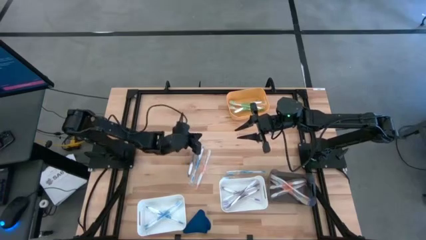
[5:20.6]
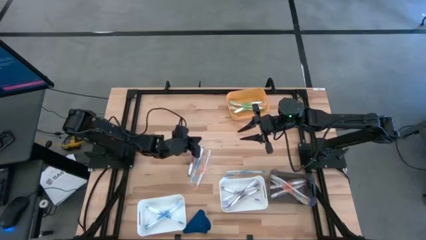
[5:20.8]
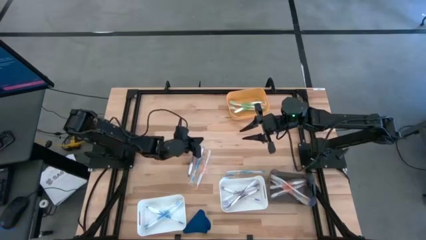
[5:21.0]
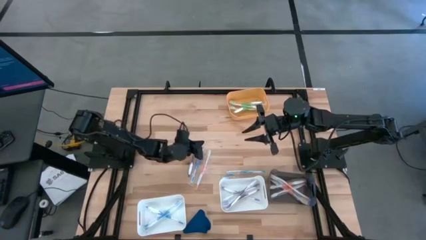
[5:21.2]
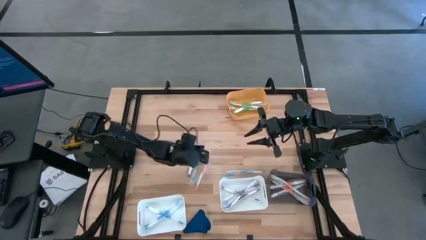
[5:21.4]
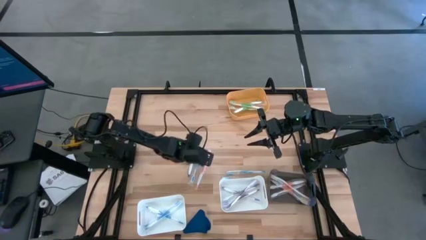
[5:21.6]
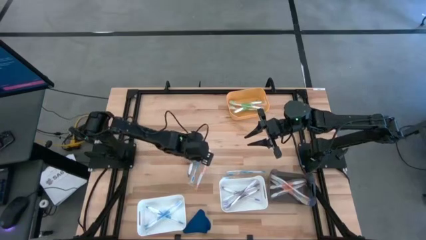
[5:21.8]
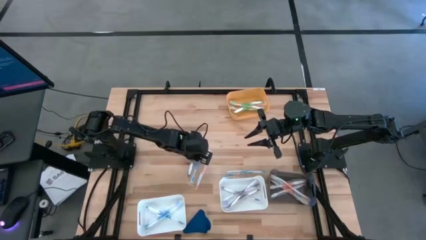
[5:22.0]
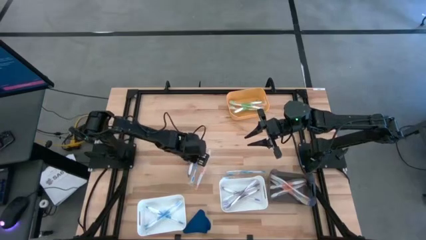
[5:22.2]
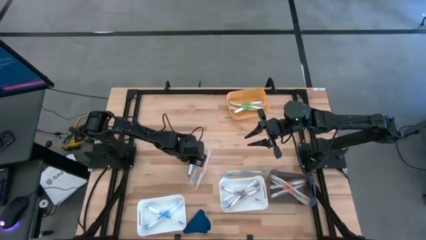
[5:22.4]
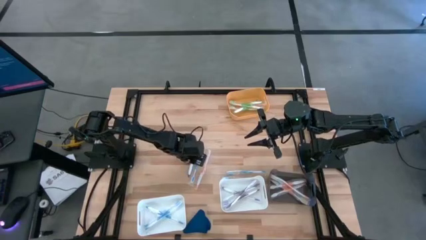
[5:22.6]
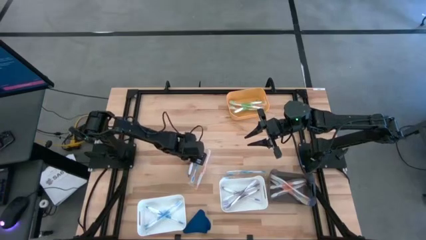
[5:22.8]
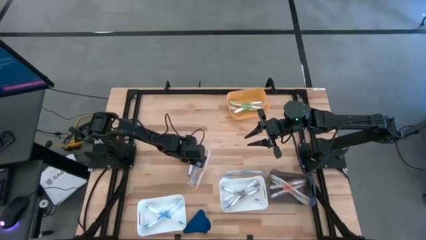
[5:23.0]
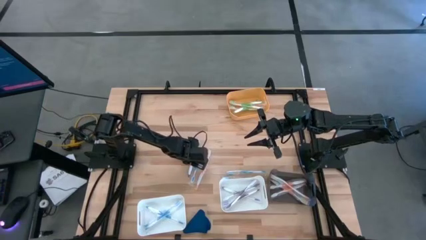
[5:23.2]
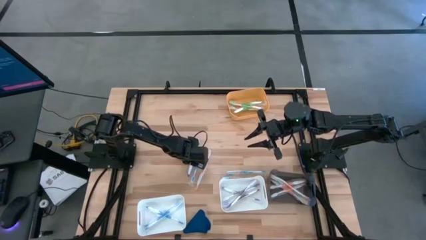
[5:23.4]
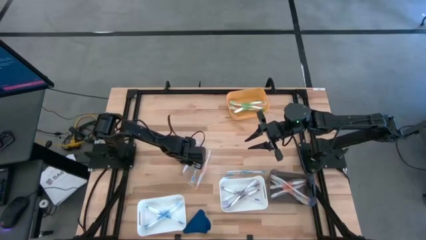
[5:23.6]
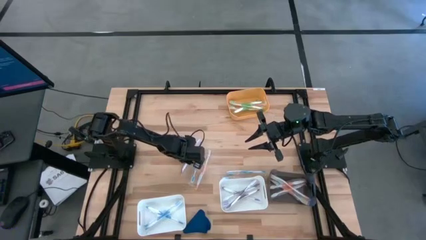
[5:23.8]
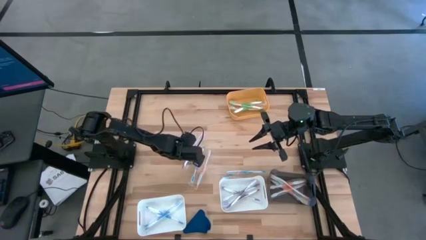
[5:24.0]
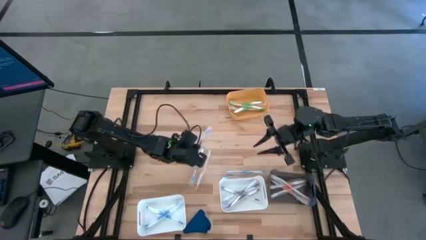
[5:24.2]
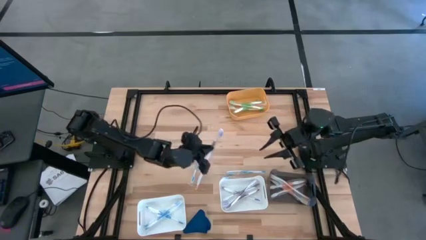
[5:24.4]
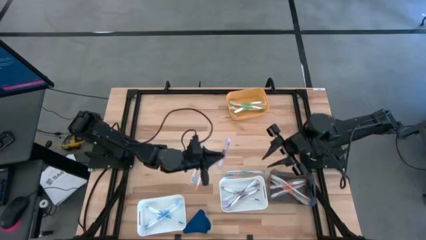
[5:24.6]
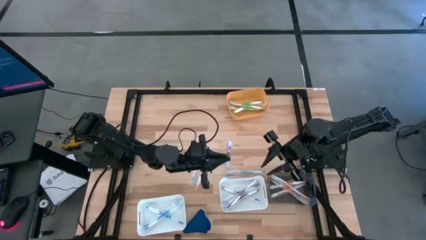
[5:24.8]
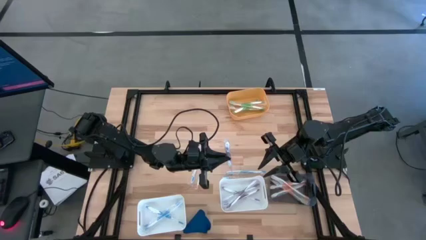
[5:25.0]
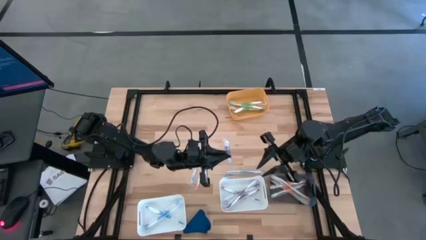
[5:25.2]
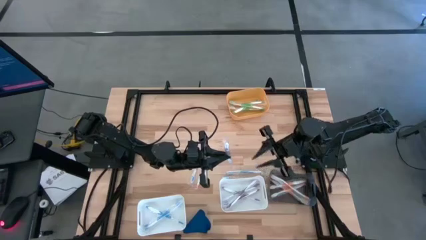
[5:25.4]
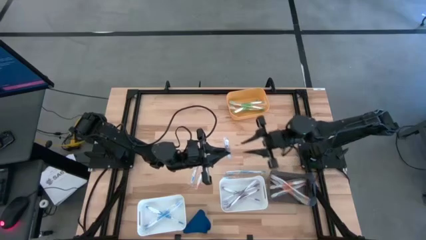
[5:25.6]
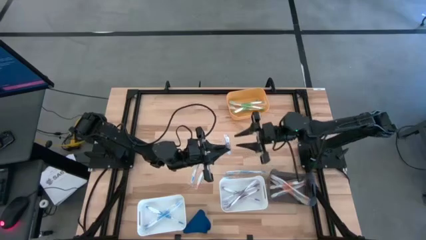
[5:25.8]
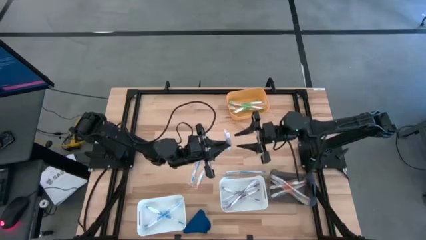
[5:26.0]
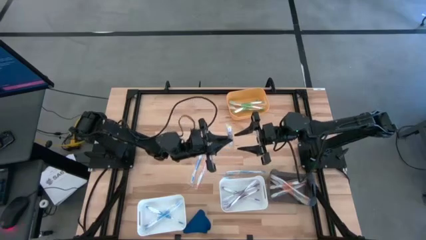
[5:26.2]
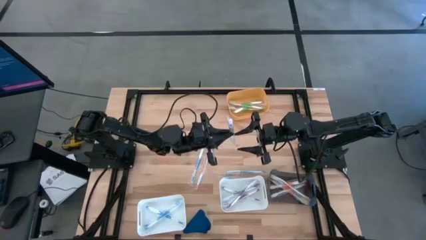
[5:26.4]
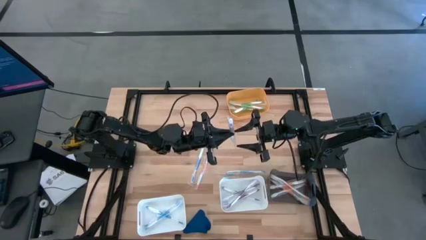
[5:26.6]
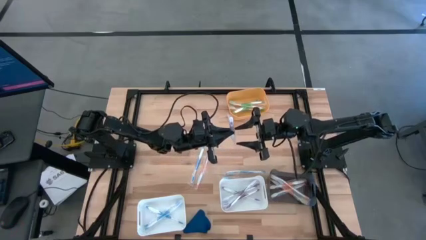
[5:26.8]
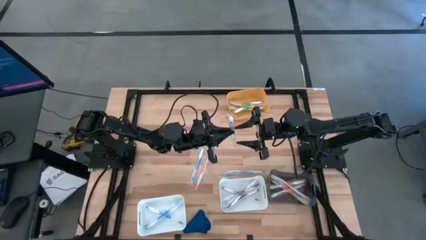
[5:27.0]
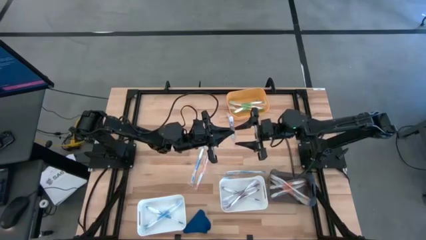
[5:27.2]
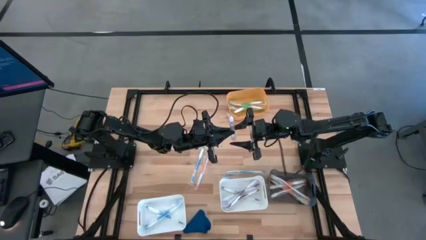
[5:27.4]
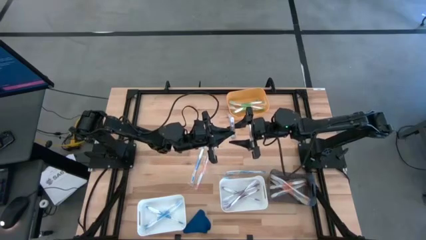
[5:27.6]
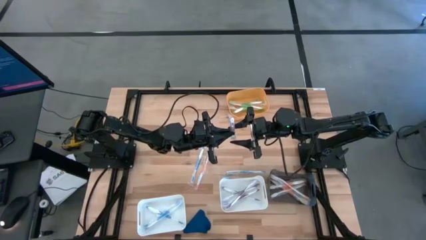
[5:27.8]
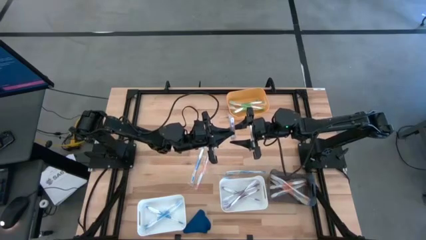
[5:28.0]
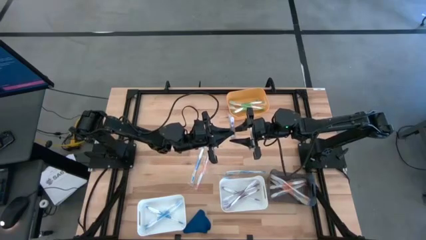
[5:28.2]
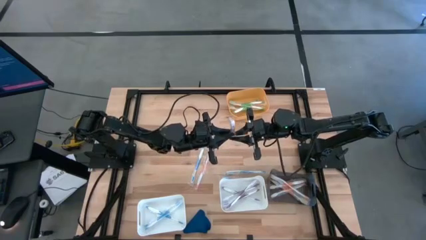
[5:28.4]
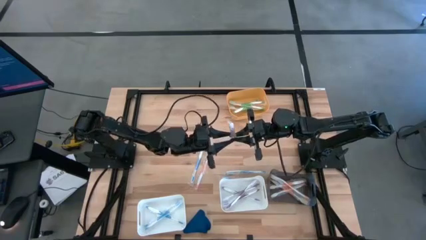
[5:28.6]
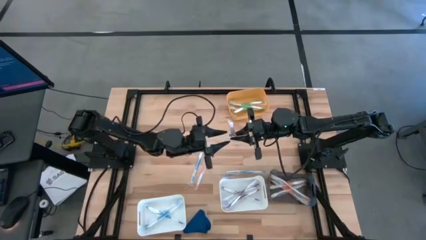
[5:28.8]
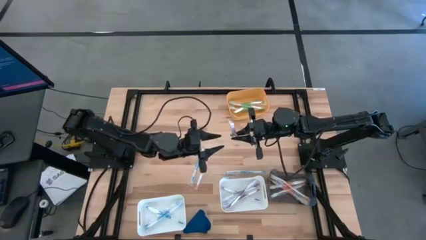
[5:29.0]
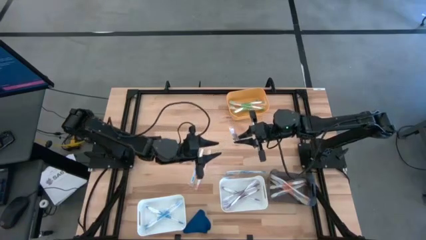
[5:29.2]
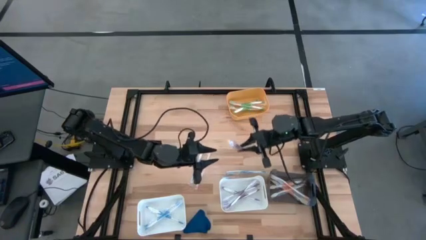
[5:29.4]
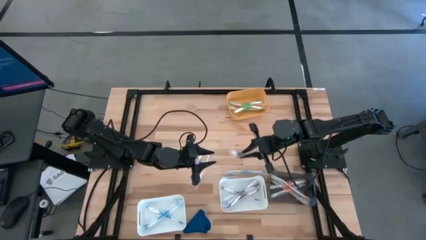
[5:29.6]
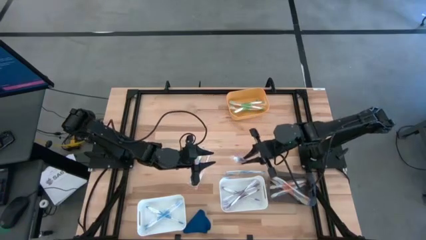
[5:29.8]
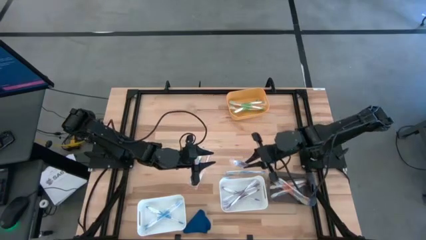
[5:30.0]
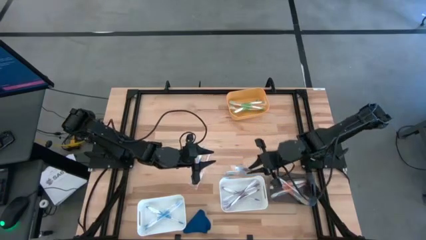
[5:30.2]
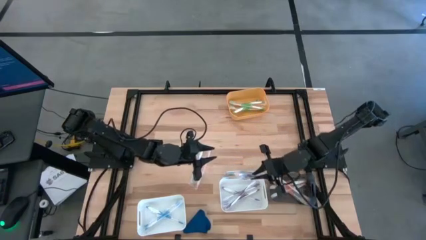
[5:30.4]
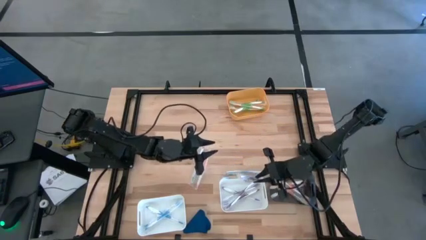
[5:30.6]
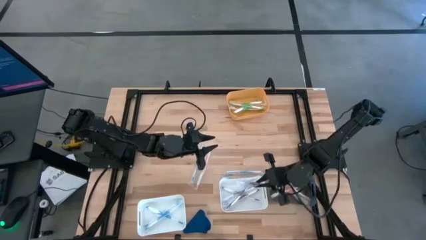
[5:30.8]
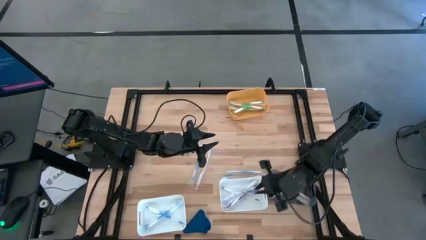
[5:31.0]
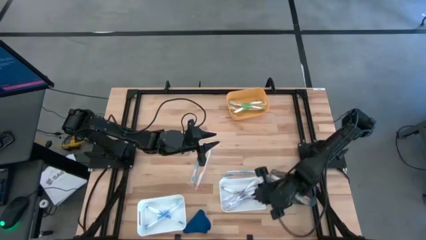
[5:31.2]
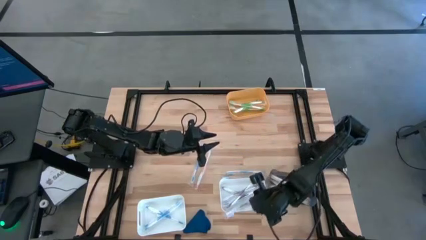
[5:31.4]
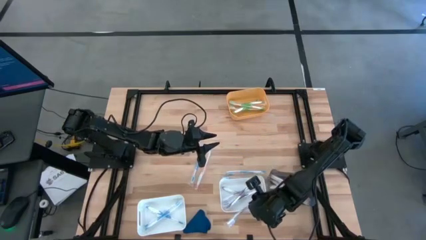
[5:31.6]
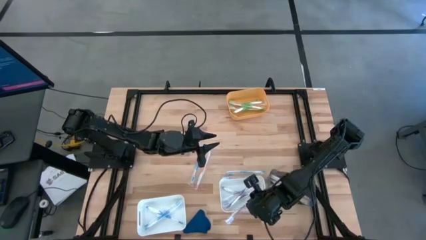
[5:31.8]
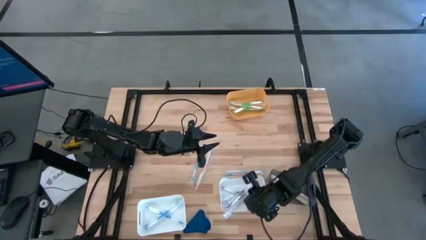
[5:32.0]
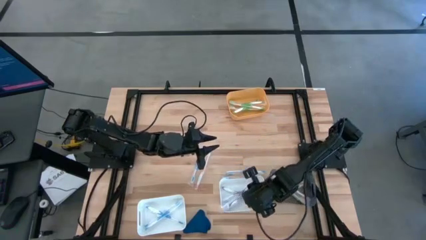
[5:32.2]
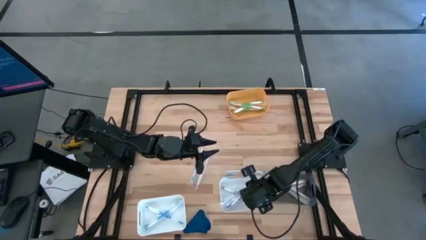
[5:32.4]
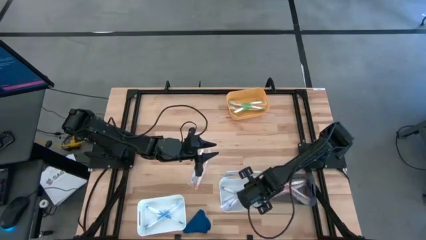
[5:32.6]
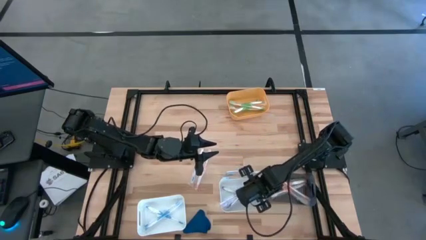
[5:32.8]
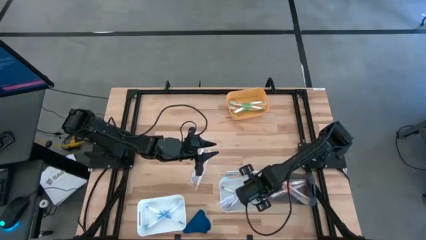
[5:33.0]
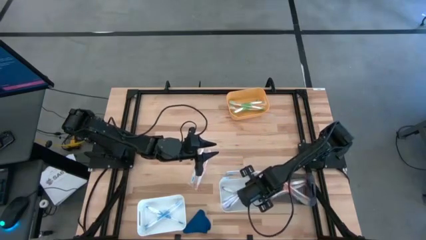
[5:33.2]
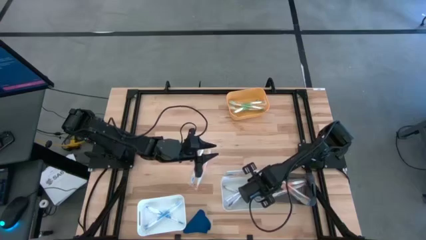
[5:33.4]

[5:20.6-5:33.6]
Task: Pick & Place Toothbrushes
Put the violet toothbrush into the right white bin

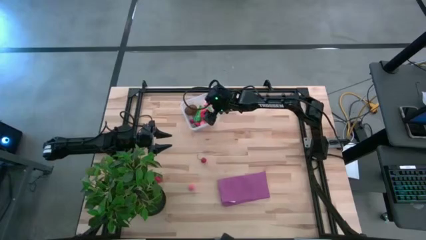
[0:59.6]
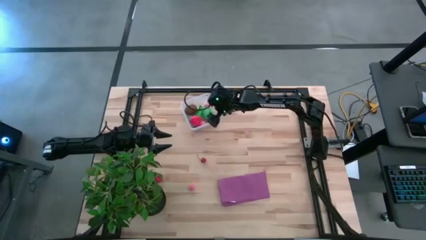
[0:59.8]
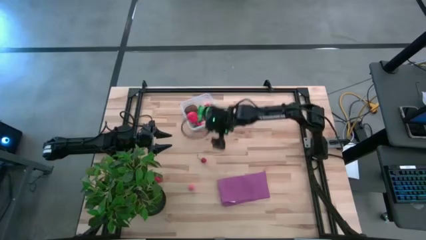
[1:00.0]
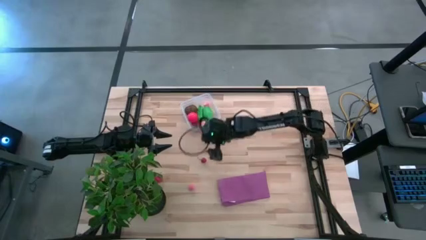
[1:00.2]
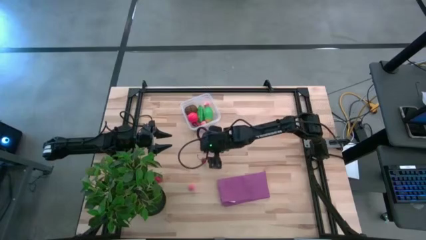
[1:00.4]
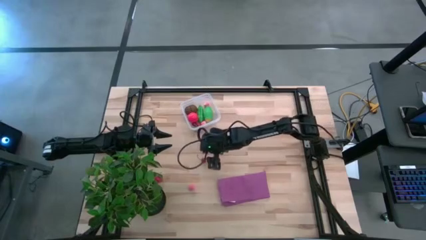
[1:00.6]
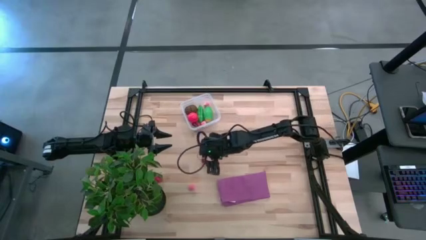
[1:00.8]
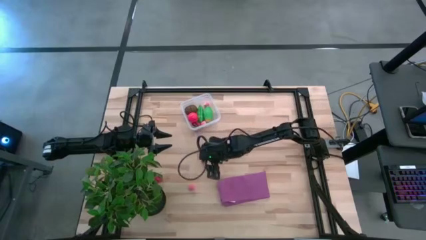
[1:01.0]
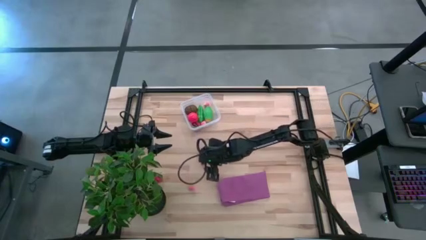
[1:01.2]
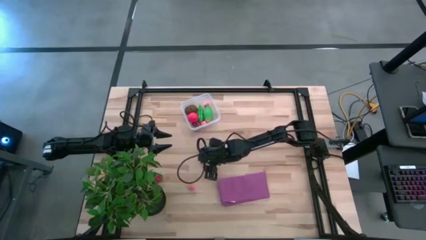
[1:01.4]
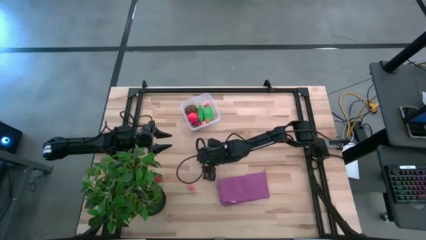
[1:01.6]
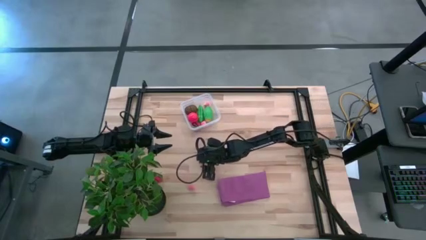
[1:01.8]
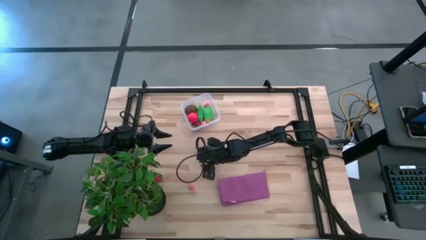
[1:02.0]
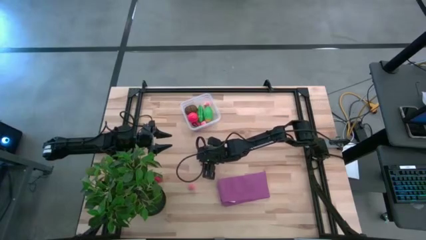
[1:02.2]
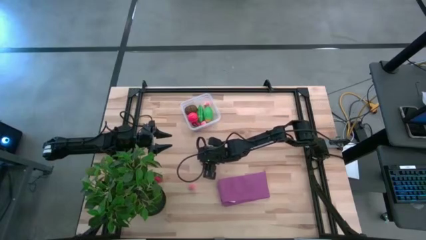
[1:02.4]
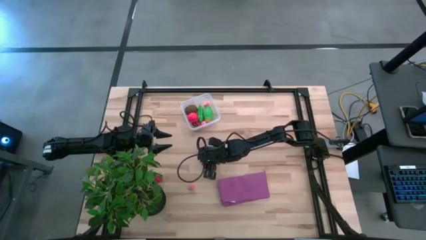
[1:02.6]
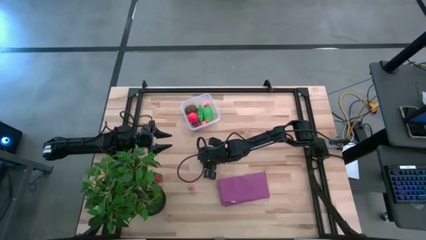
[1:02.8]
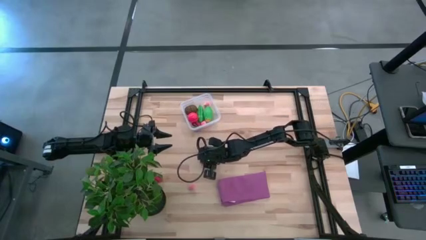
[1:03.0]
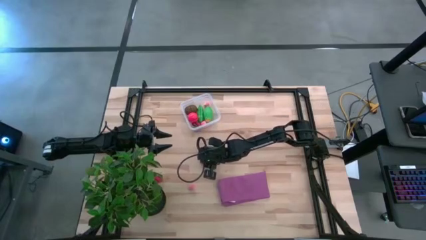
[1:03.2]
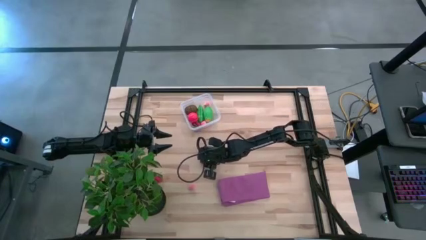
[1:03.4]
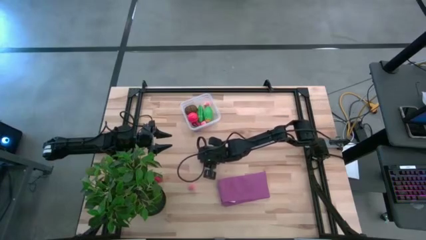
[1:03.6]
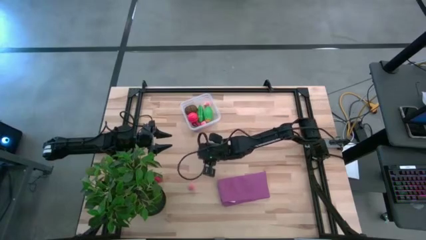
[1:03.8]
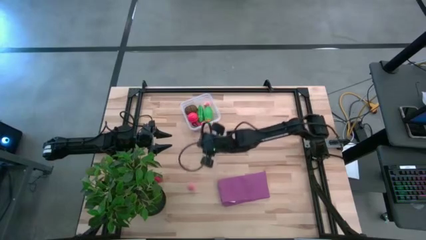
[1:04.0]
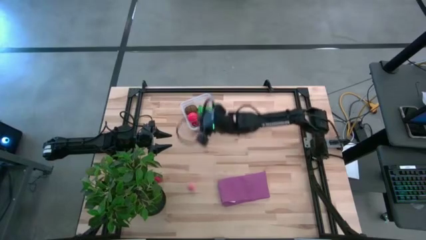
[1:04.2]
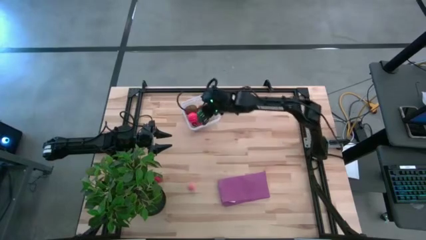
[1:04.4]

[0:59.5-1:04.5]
Task: Pick and placing Produce into tupperware
Put the red cherry into the transparent bin
